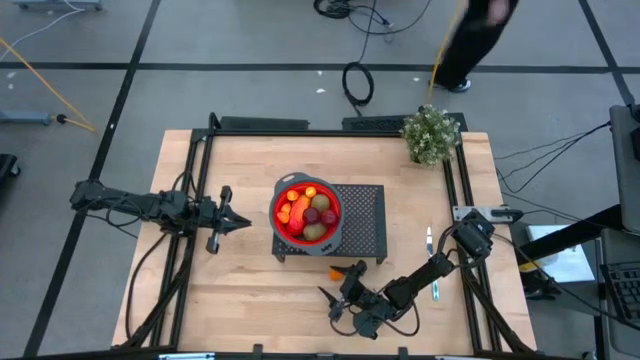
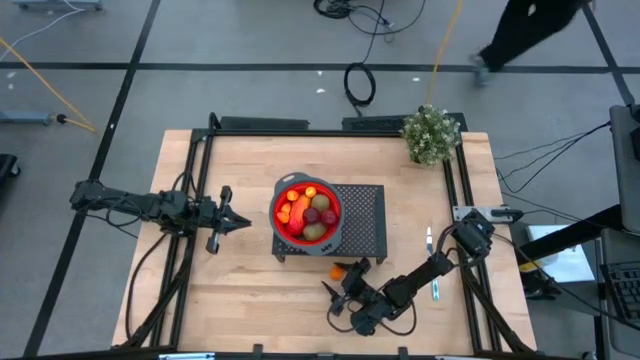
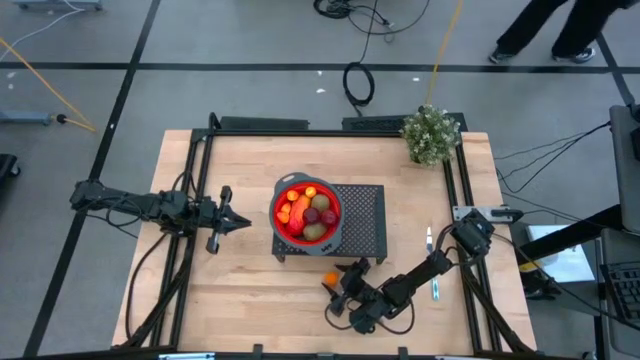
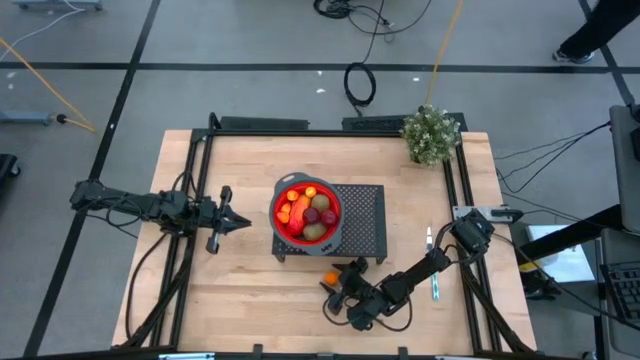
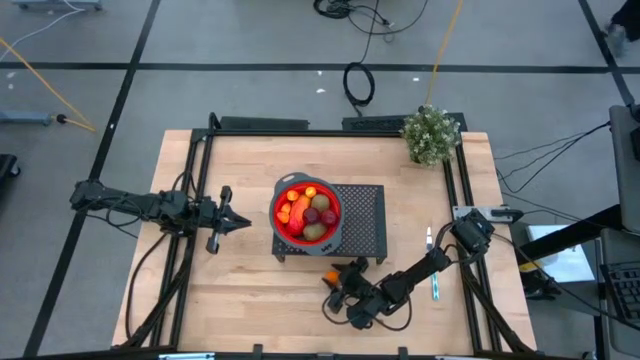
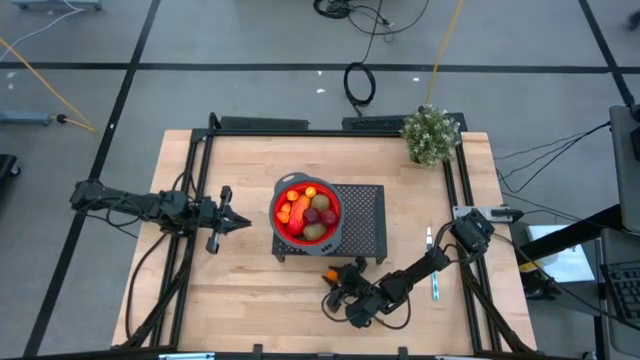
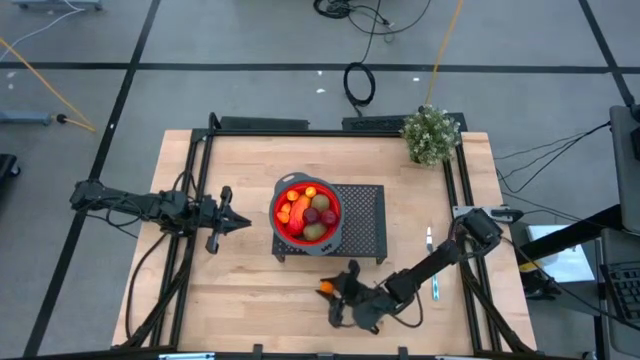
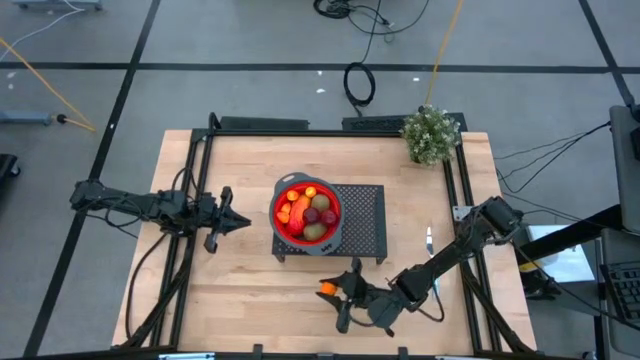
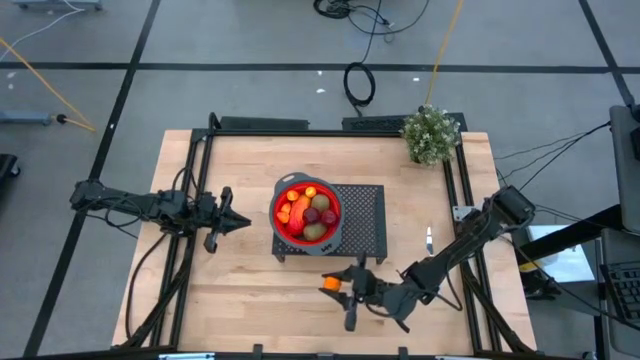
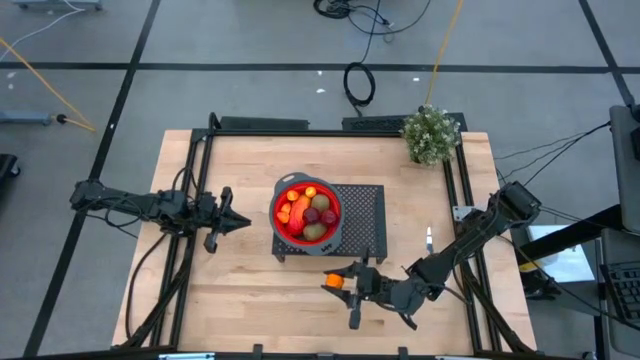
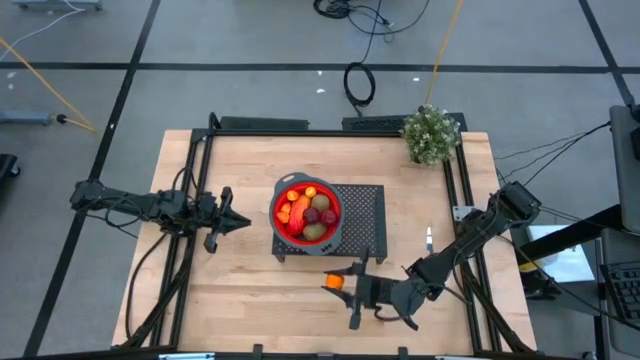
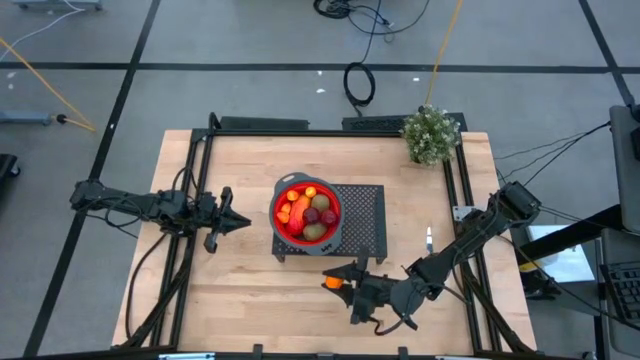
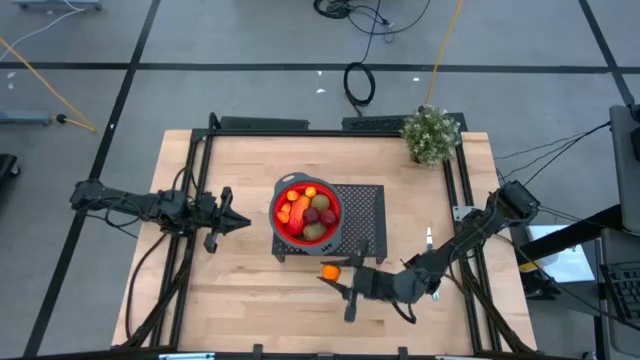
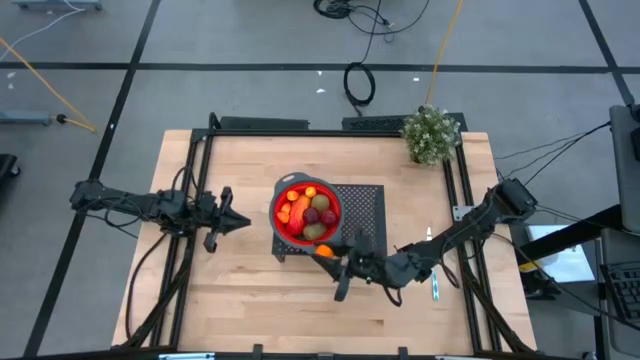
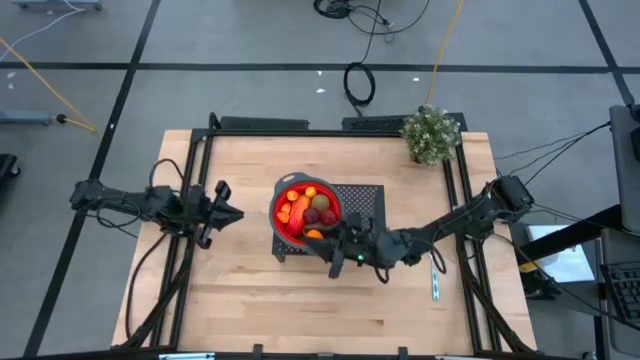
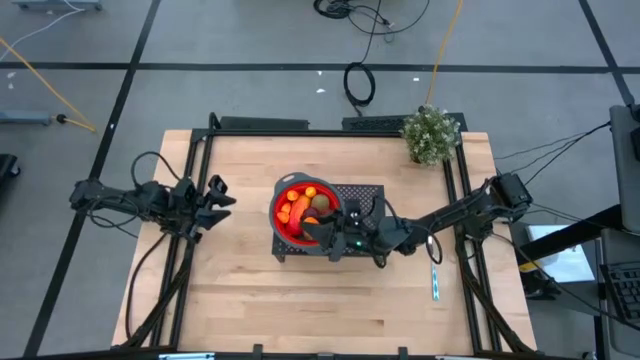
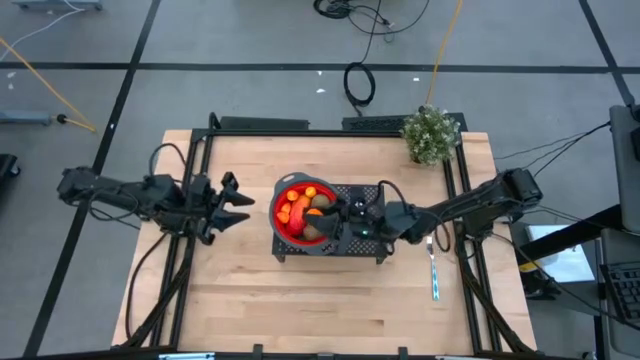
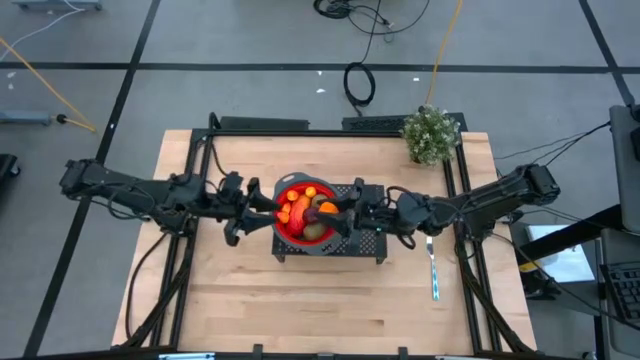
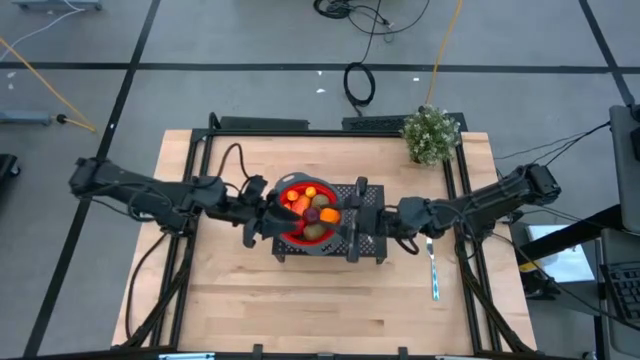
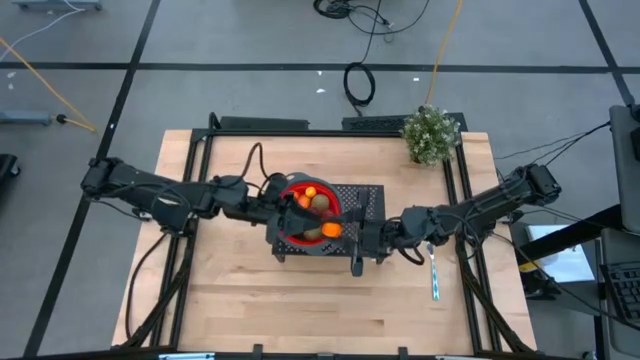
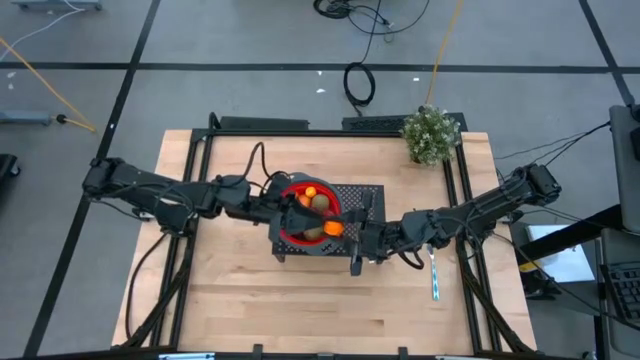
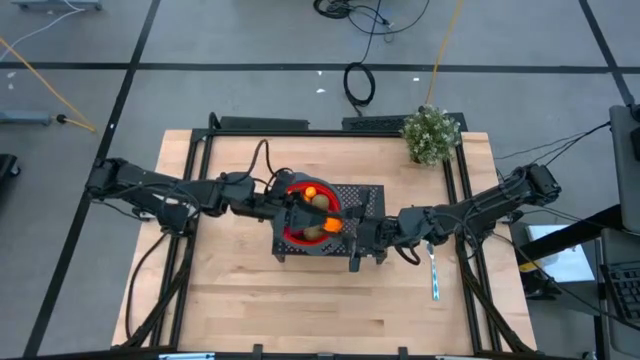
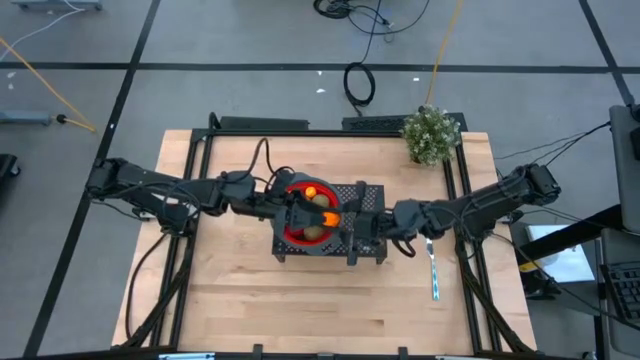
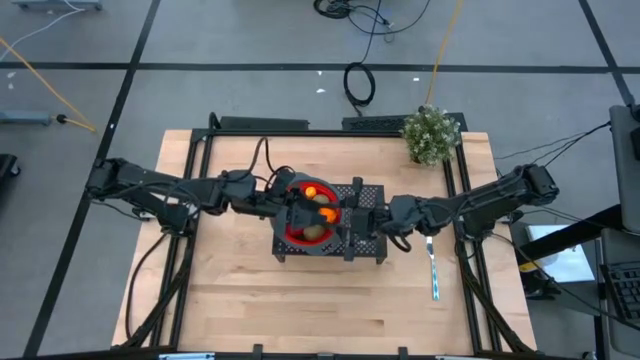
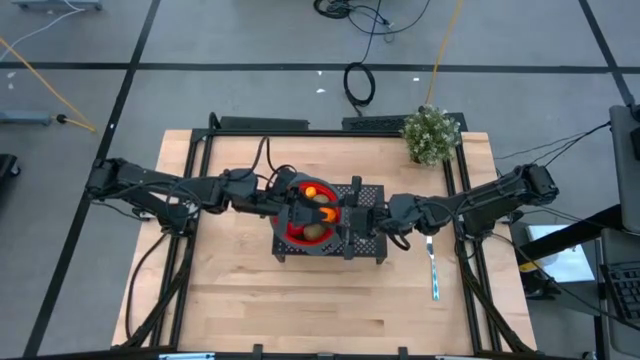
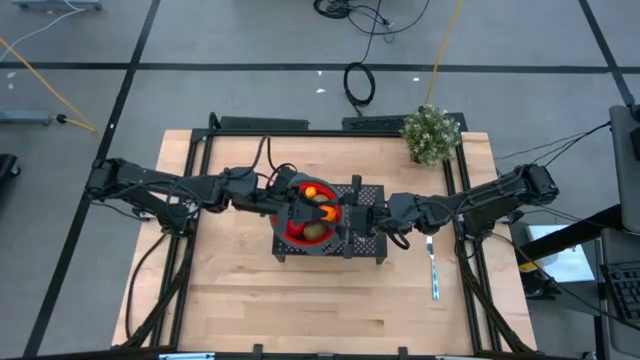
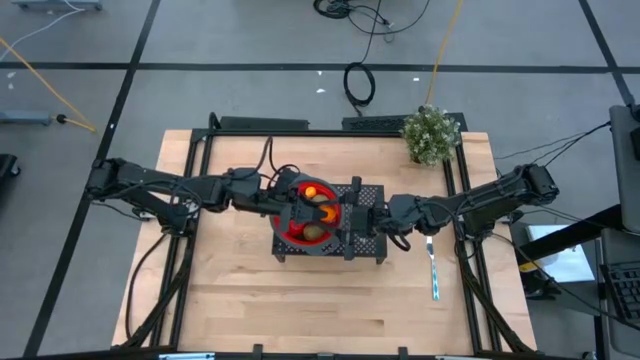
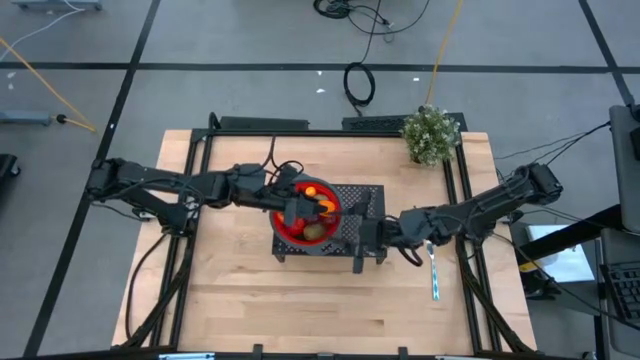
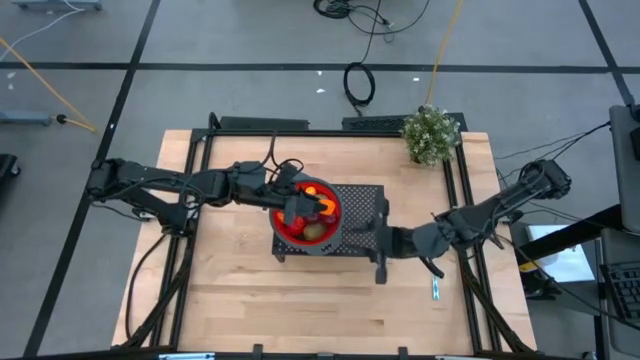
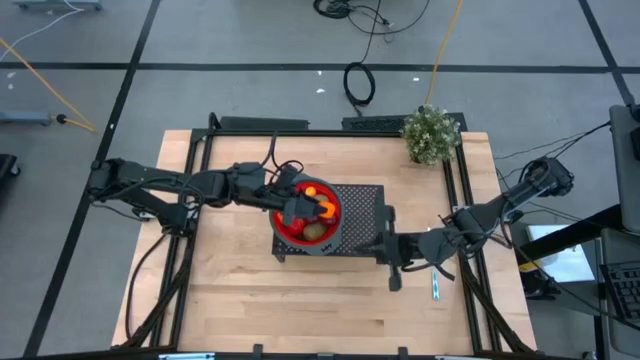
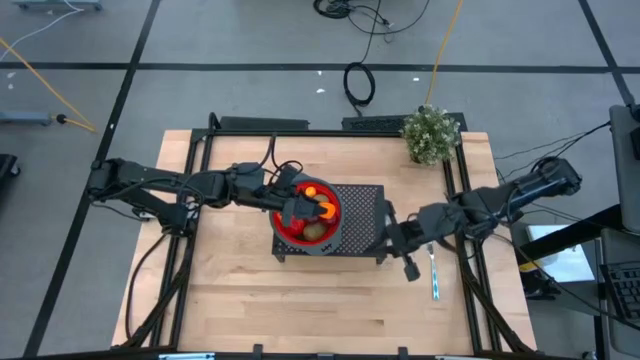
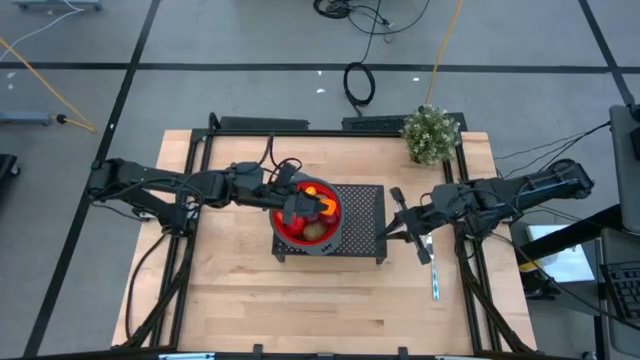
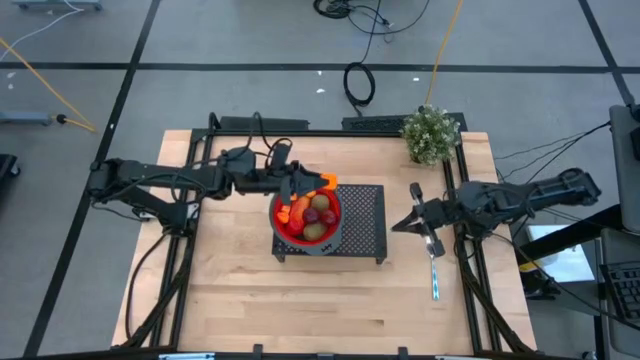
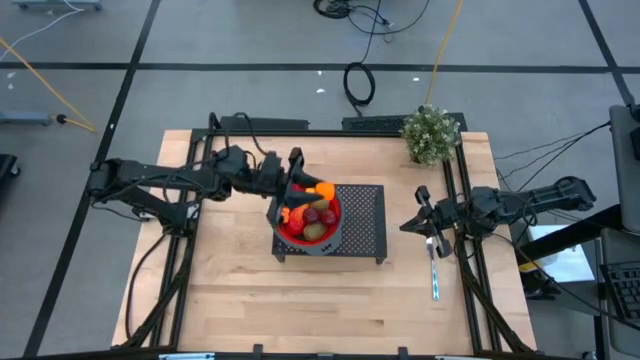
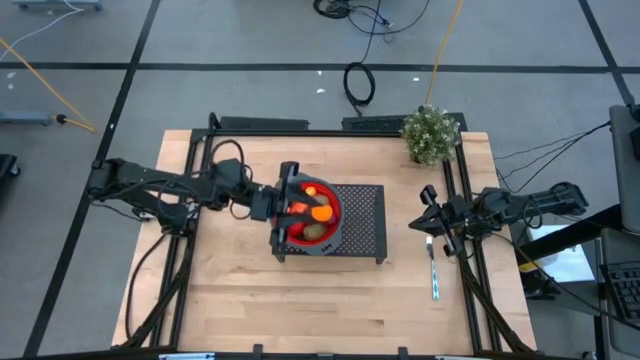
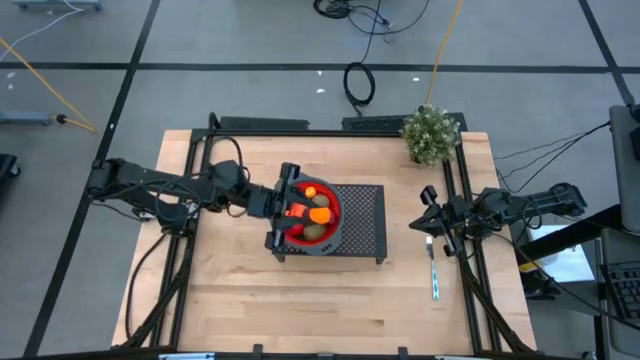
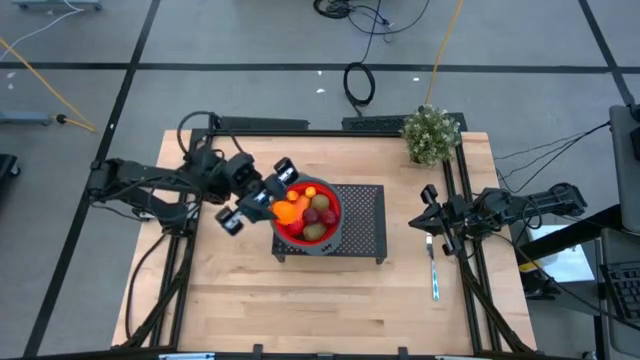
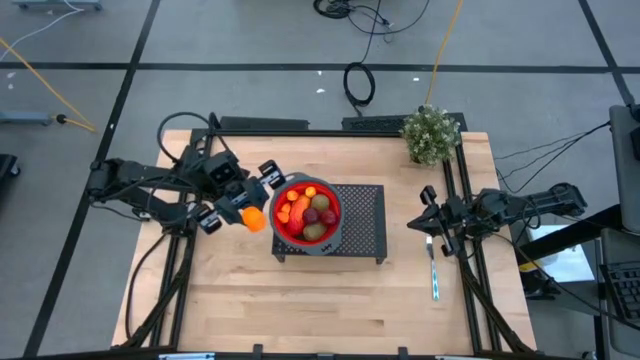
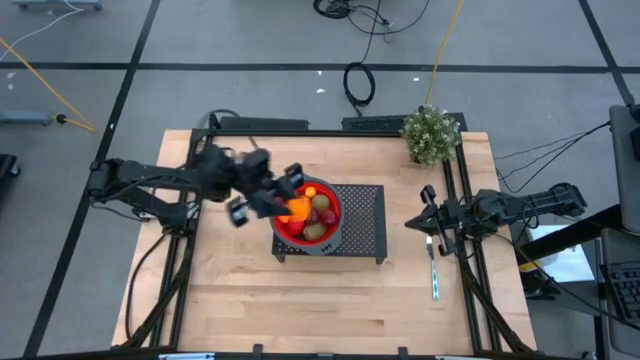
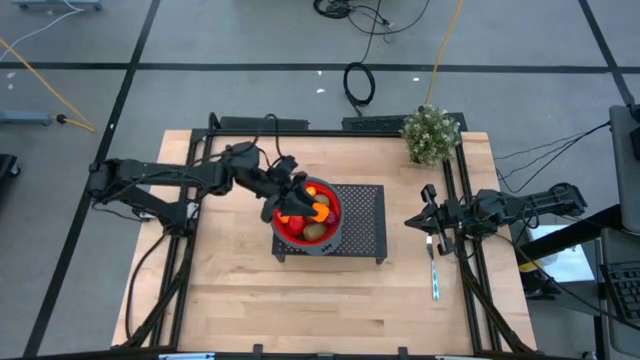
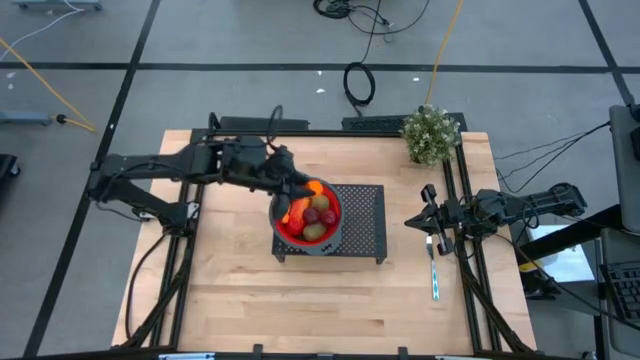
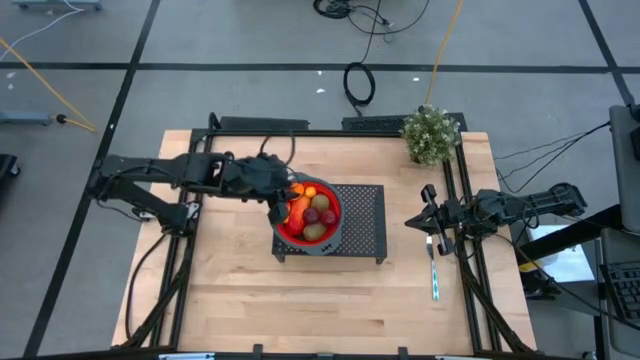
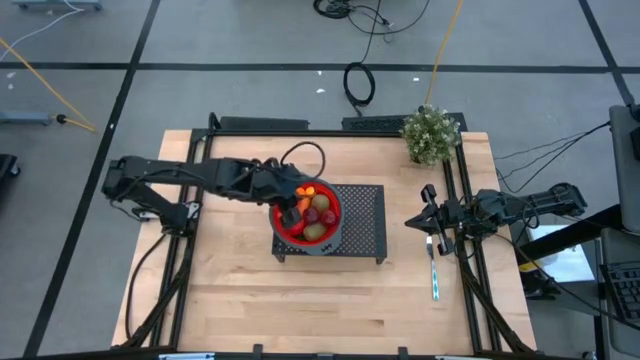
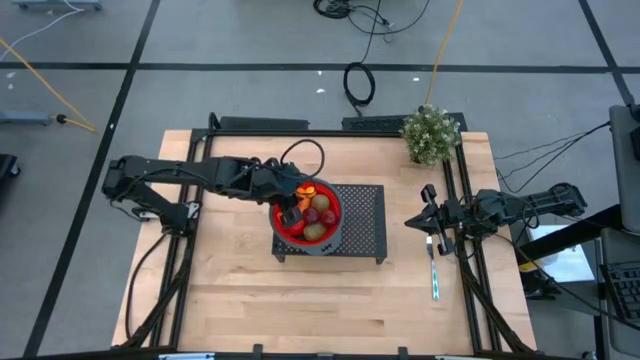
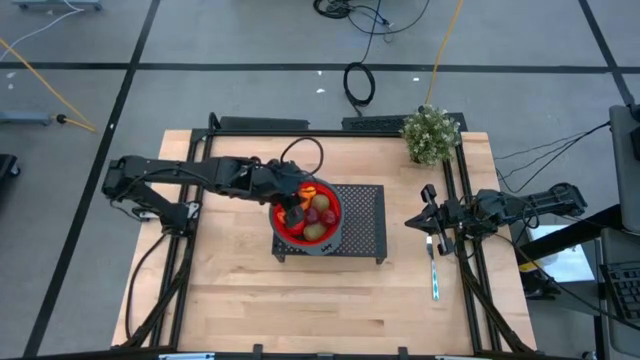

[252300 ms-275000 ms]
Task: Pick & Place Fruit
Put the tangerine into the red colander on the shelf
